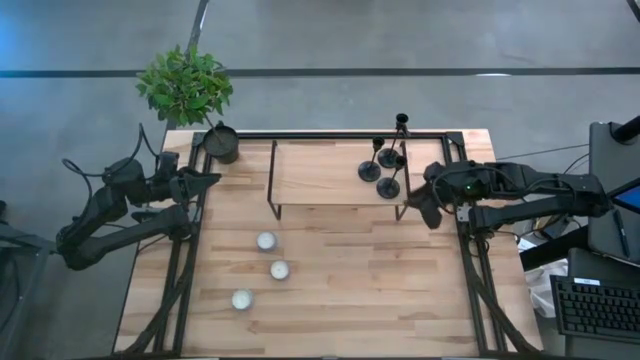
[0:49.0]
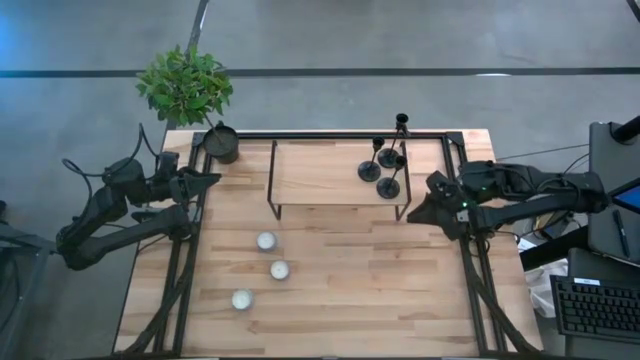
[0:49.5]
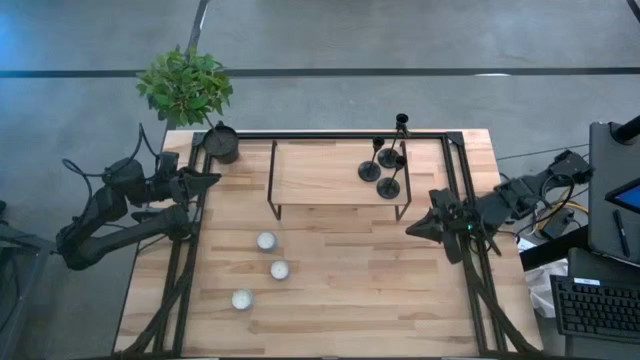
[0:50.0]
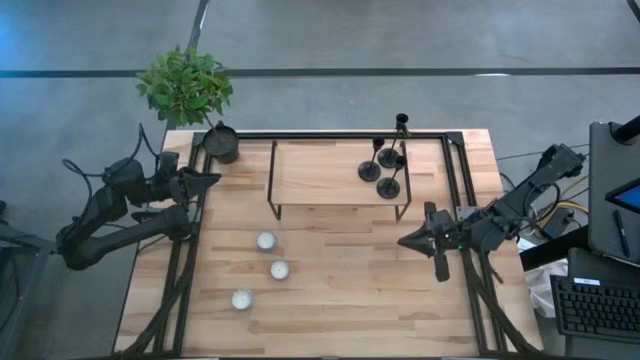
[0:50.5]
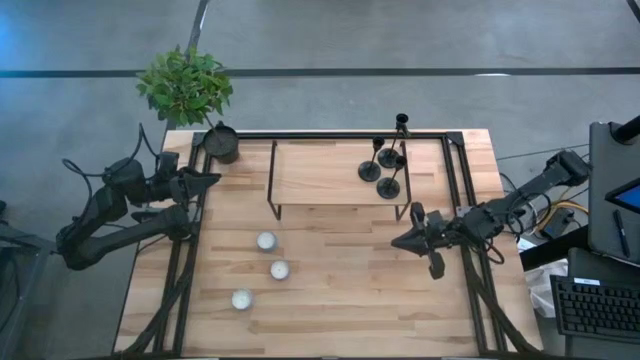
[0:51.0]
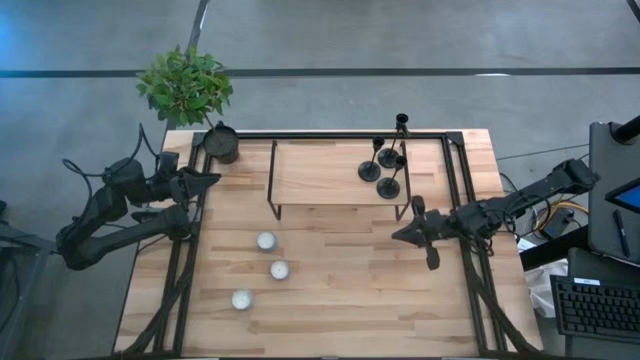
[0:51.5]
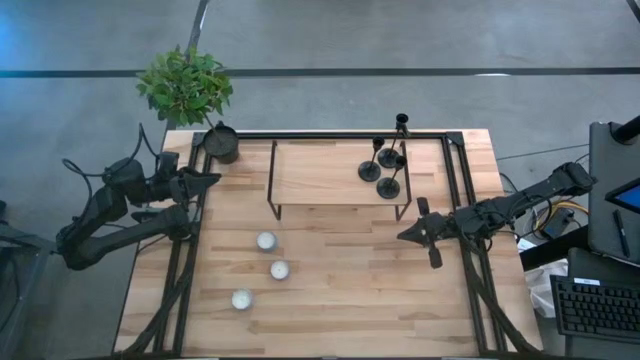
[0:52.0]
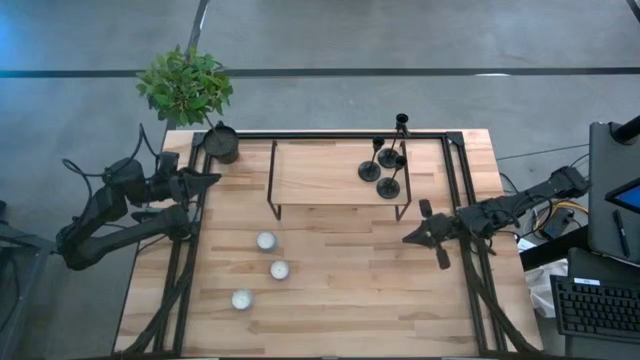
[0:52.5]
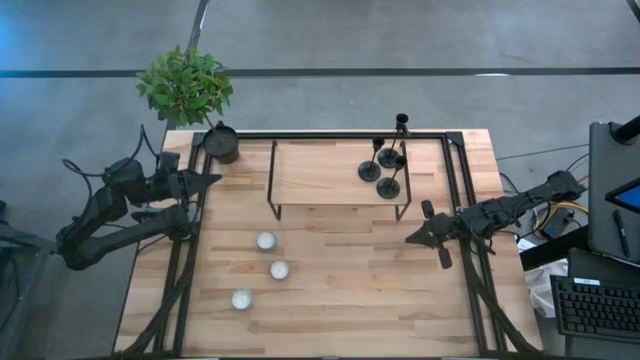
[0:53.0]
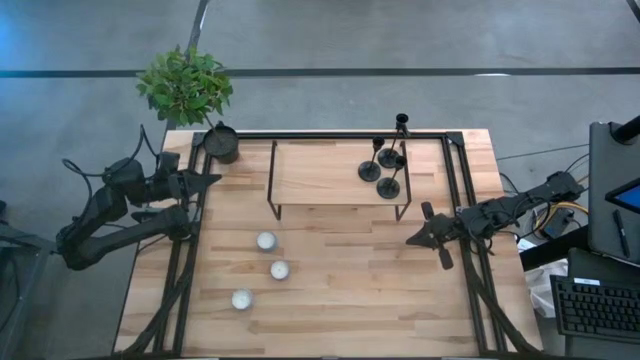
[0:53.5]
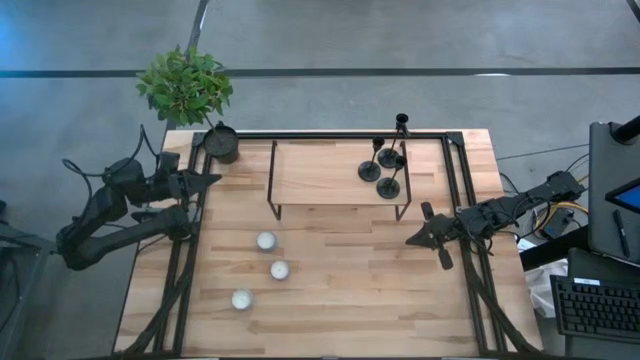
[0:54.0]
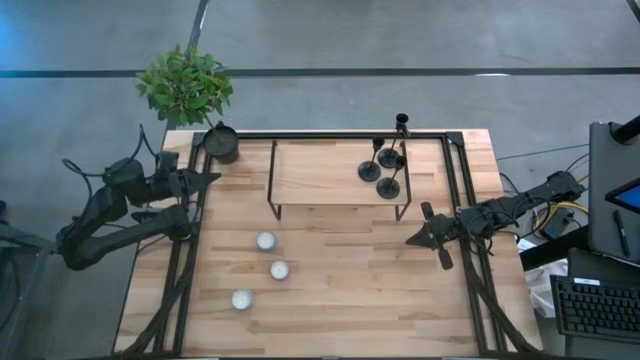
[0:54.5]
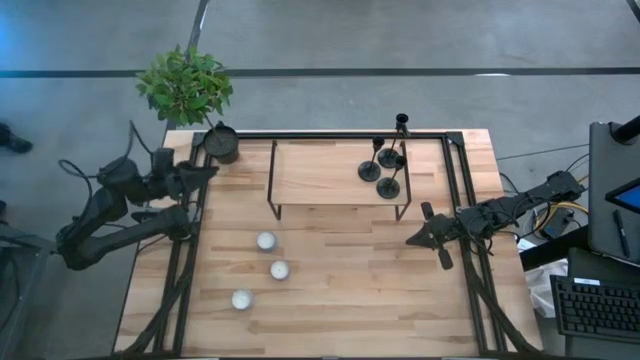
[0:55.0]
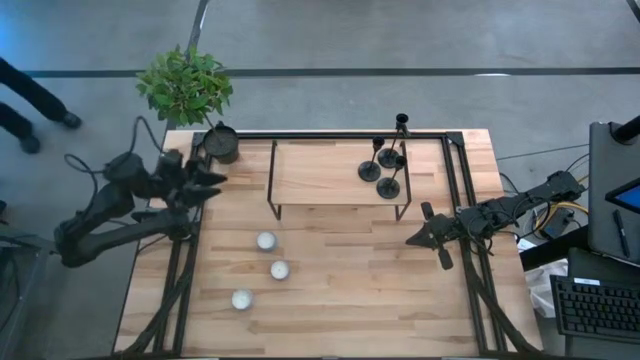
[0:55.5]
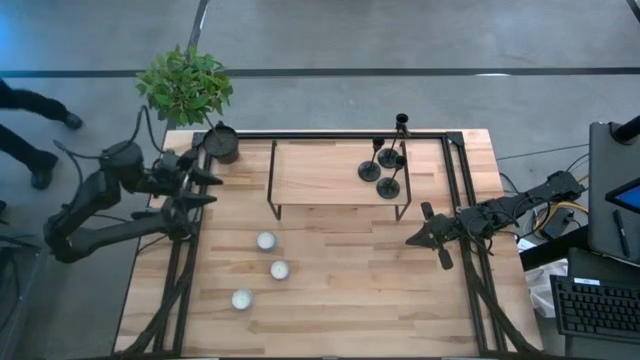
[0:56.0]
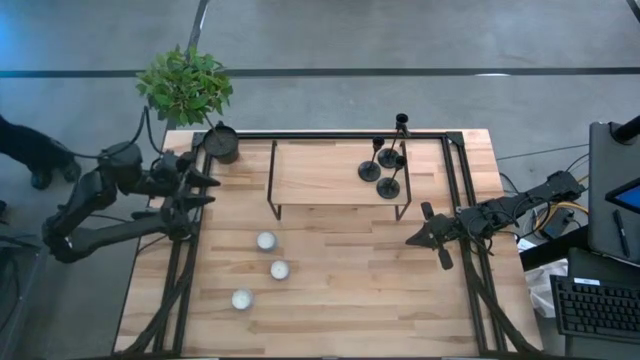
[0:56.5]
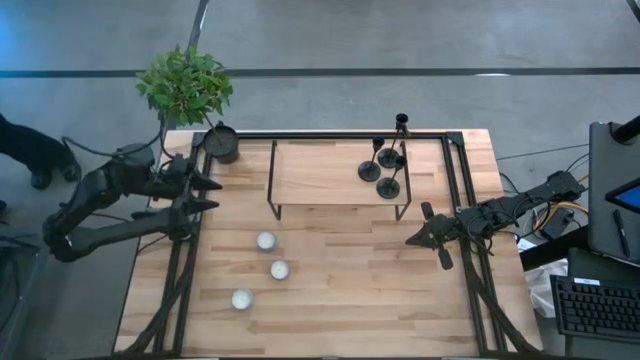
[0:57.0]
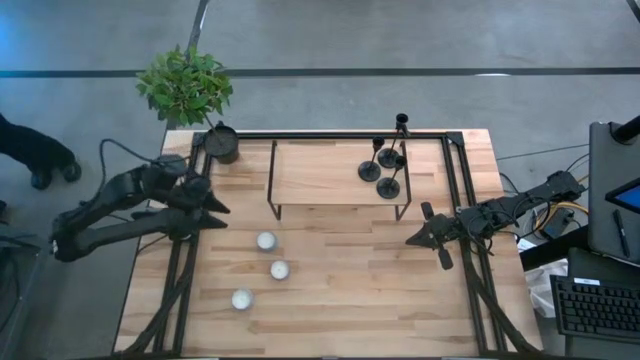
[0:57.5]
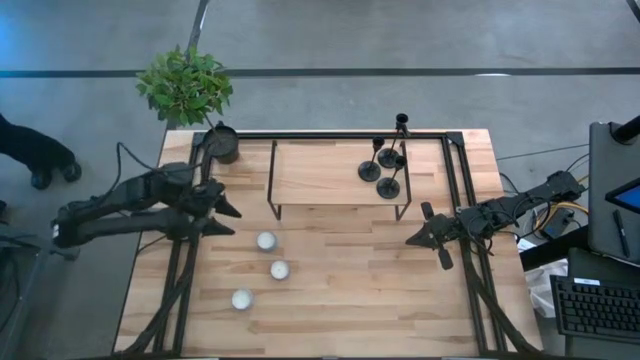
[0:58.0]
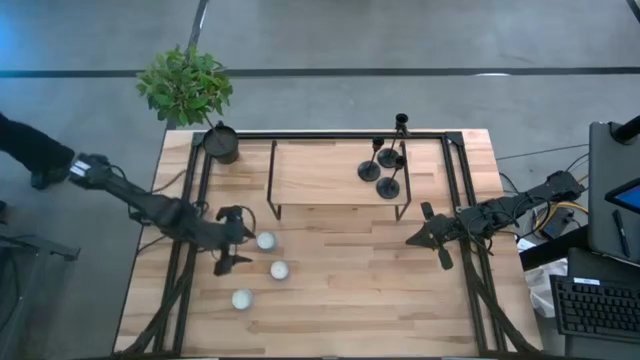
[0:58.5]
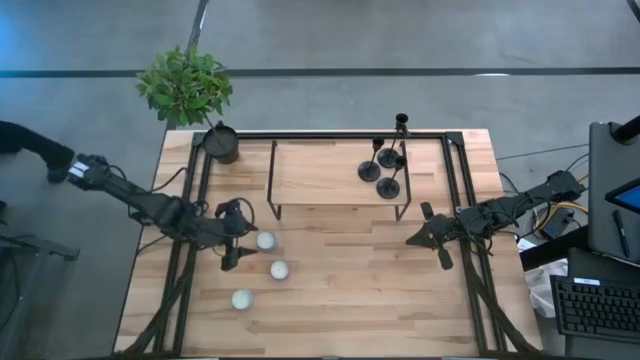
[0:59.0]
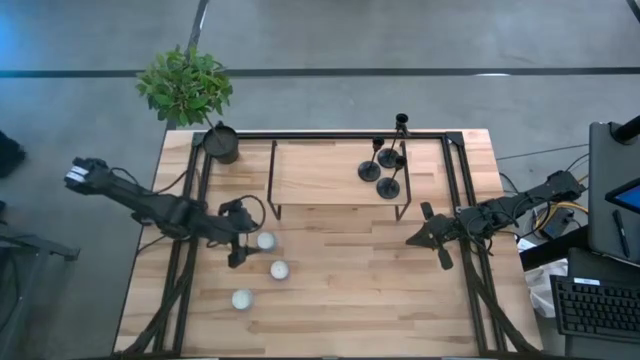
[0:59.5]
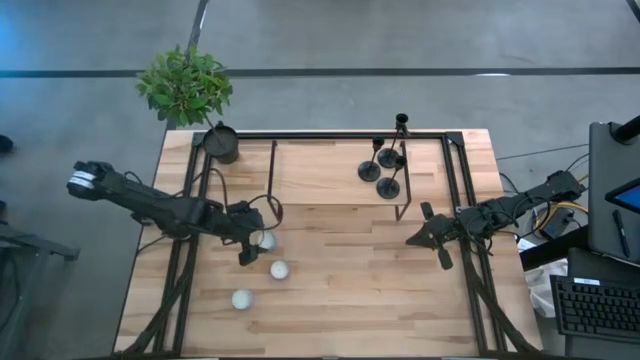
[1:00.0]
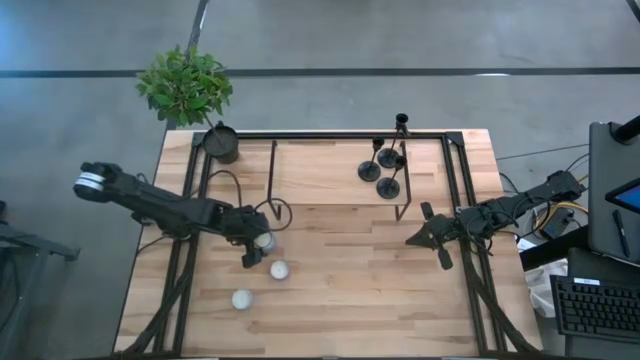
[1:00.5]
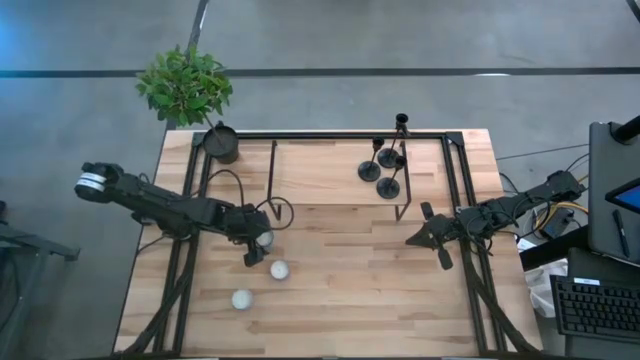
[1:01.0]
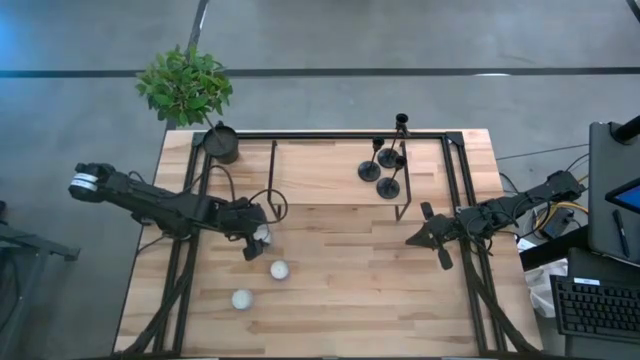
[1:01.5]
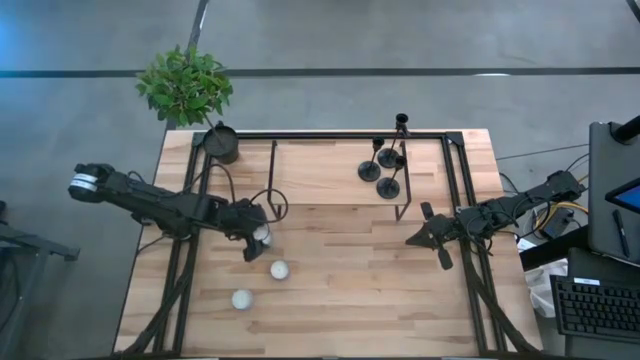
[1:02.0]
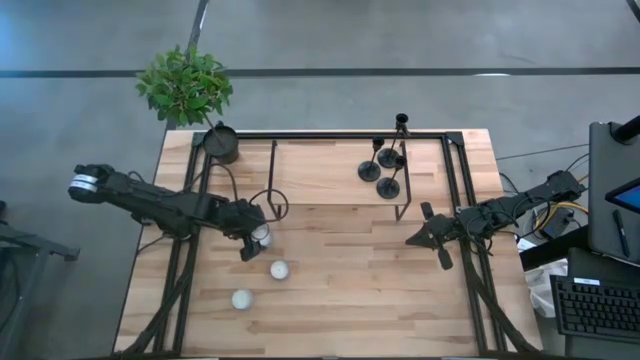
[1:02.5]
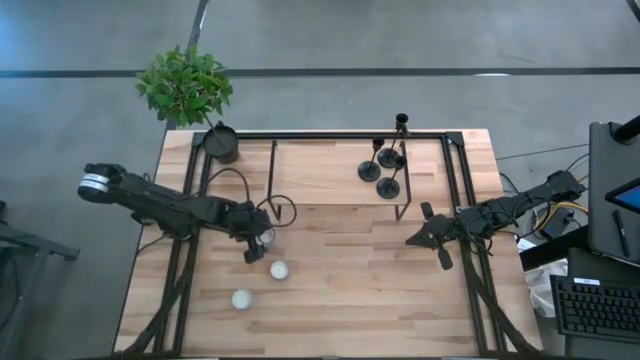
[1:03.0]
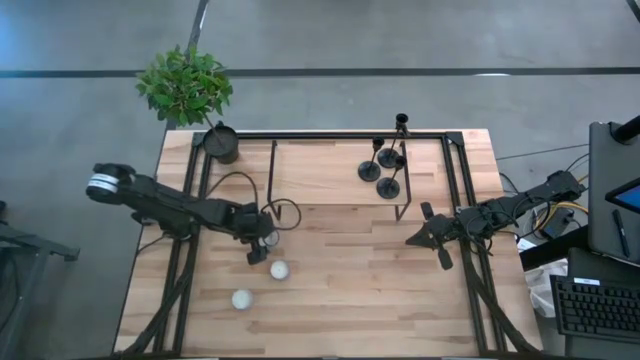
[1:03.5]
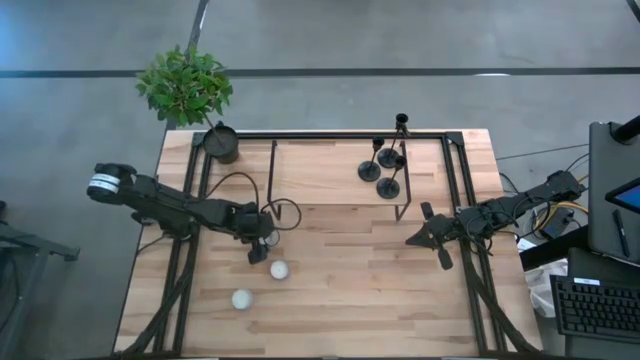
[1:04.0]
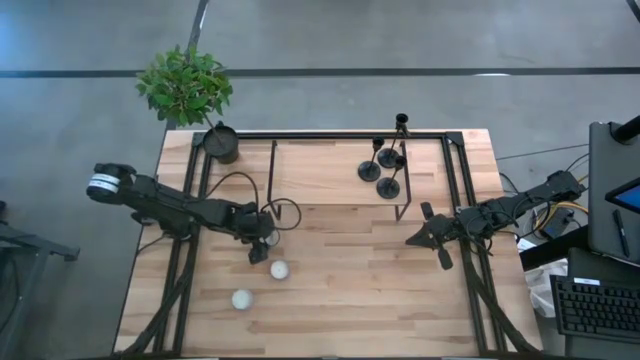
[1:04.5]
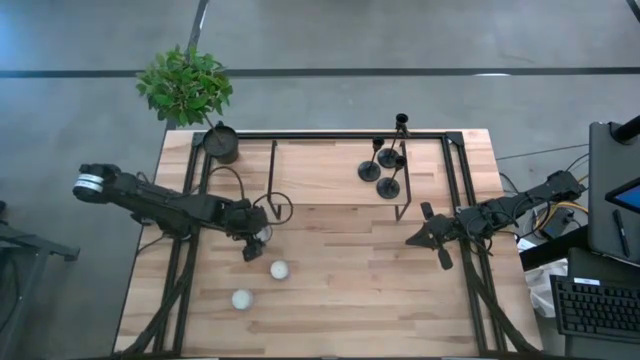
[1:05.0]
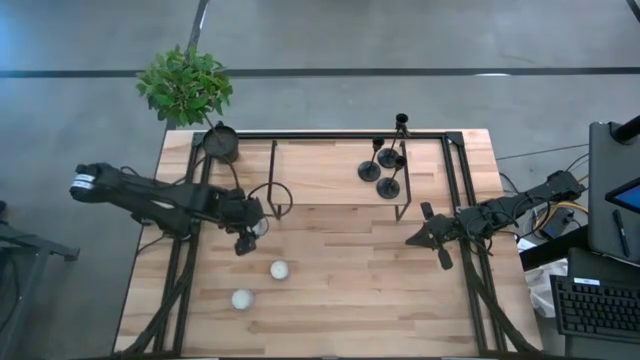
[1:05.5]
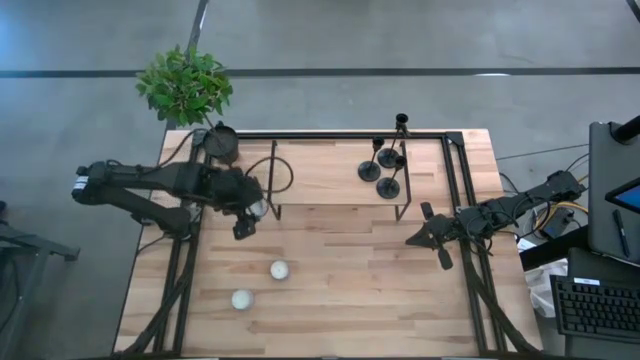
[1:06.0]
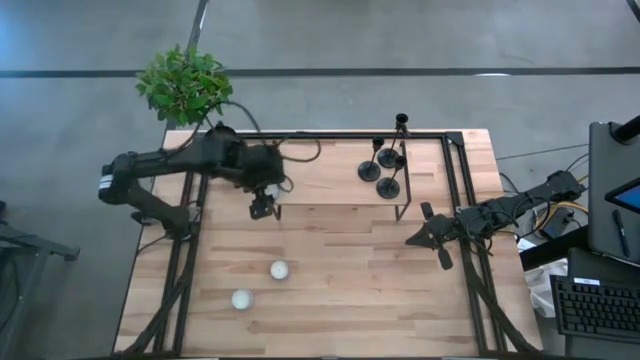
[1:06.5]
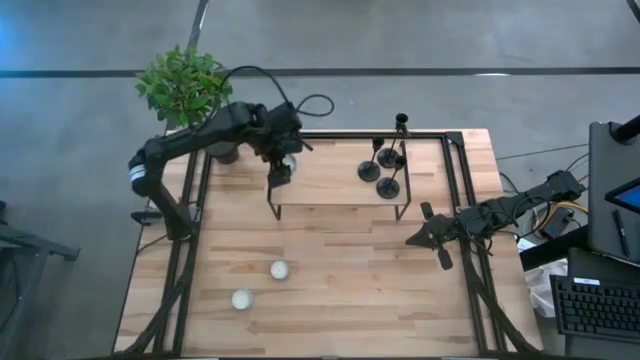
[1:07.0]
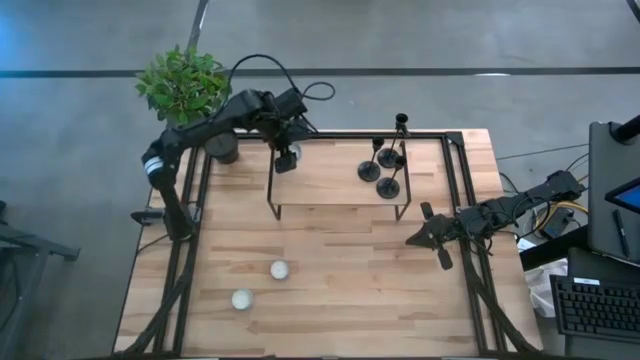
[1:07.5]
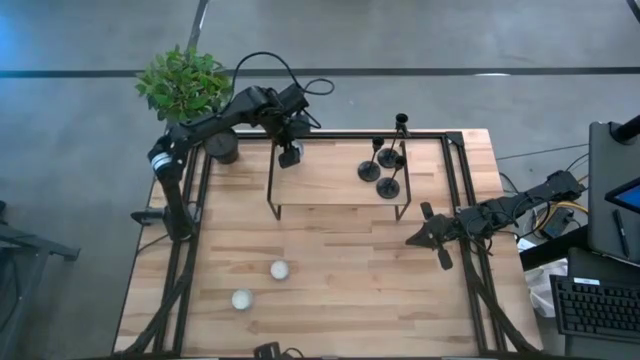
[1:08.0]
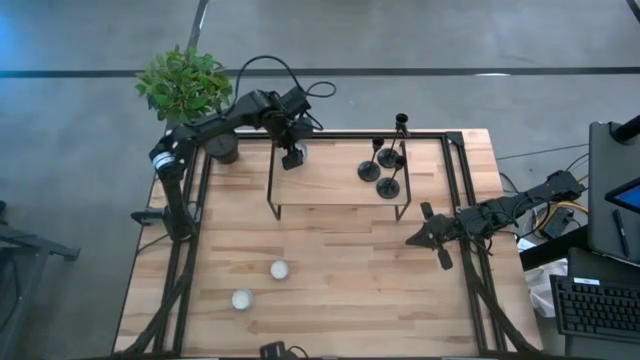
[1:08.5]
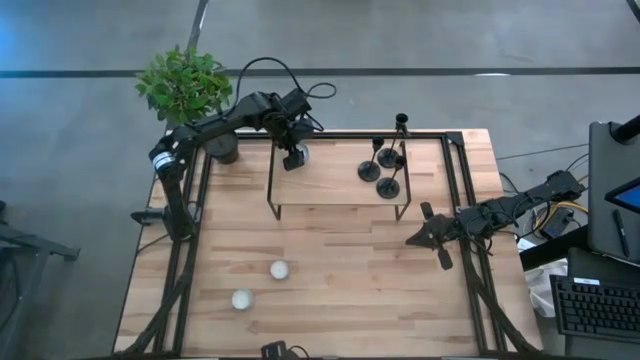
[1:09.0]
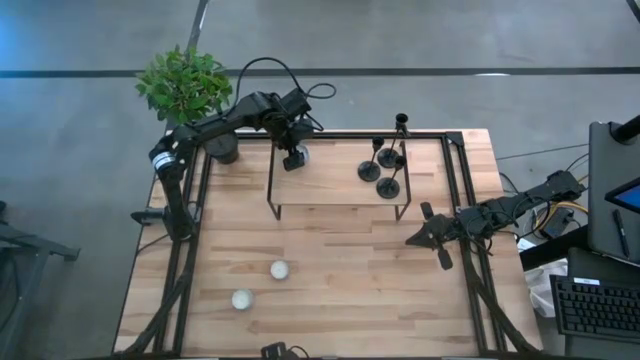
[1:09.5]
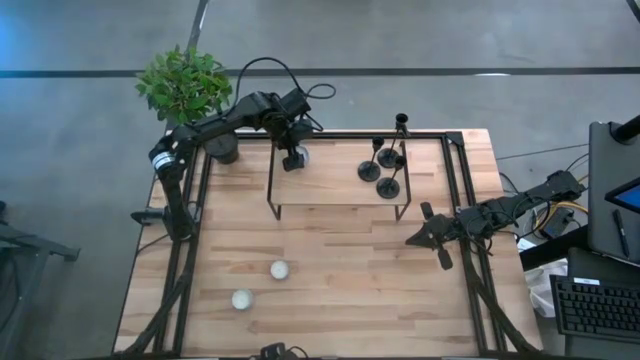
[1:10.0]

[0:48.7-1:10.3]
Task: Pick & Place candle stick holders
Put the blue scented candle on the shelf
